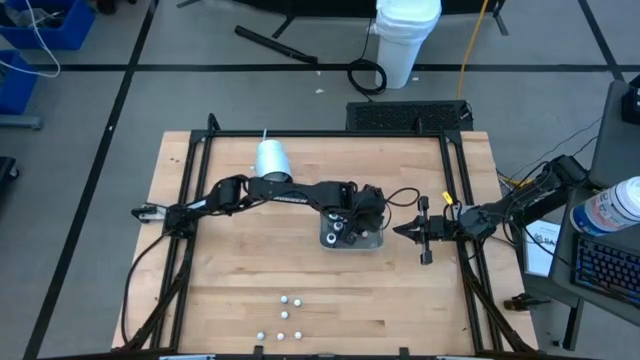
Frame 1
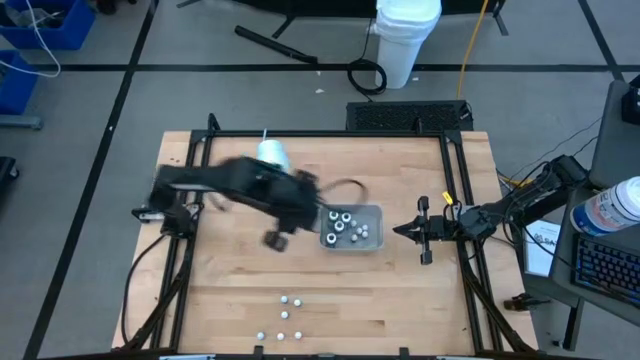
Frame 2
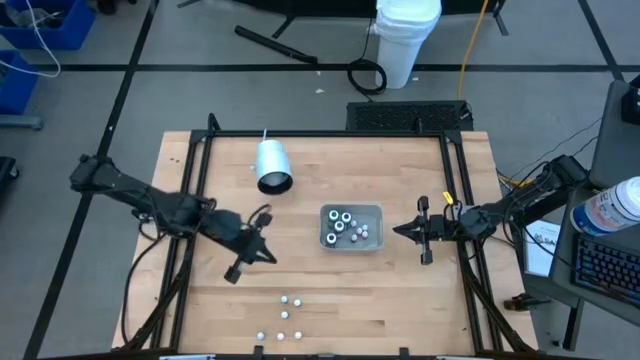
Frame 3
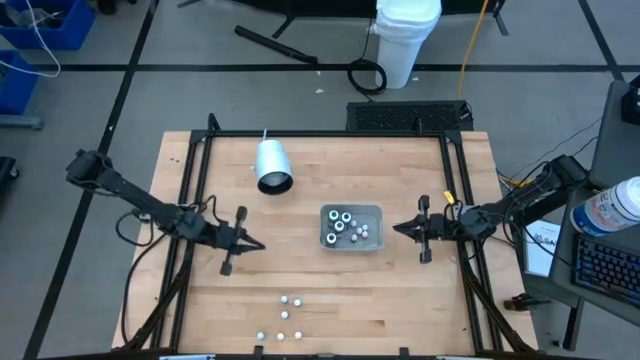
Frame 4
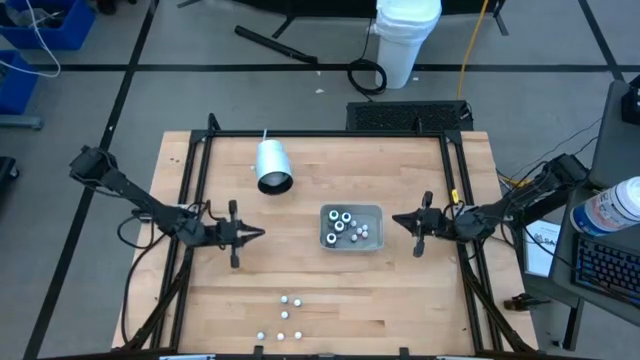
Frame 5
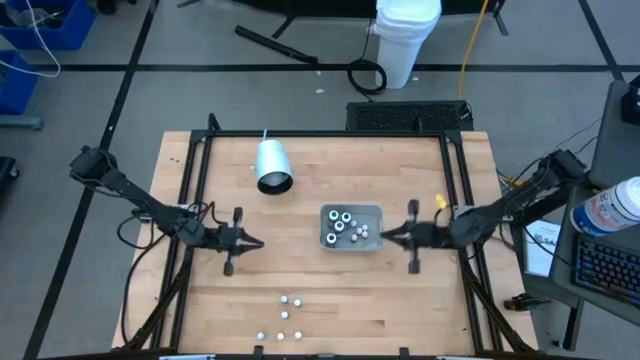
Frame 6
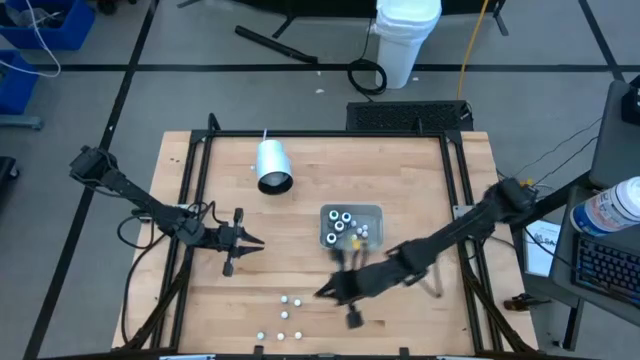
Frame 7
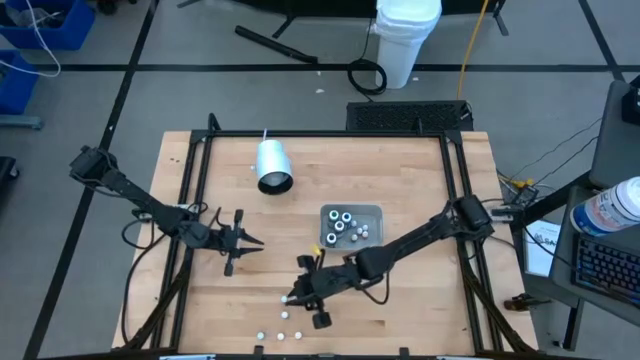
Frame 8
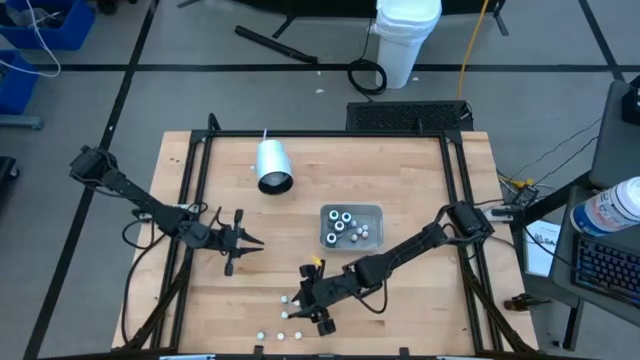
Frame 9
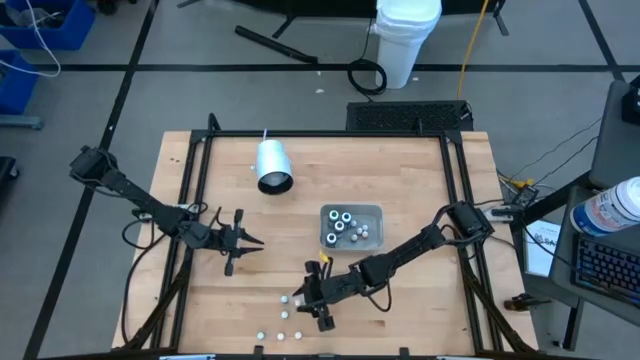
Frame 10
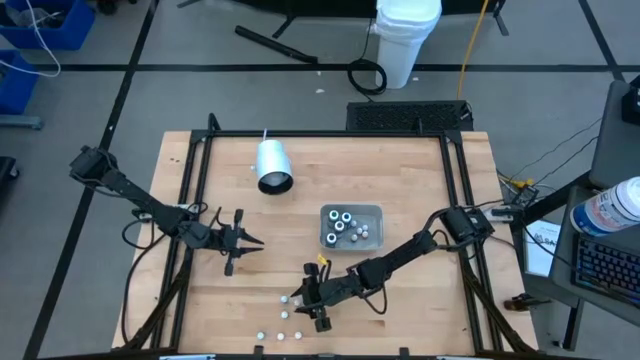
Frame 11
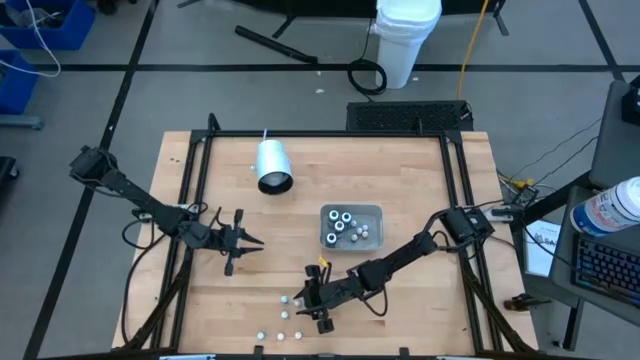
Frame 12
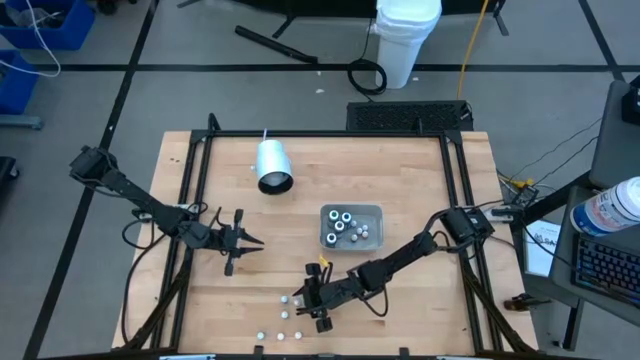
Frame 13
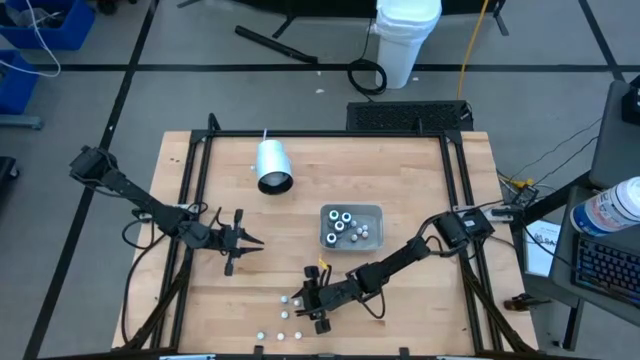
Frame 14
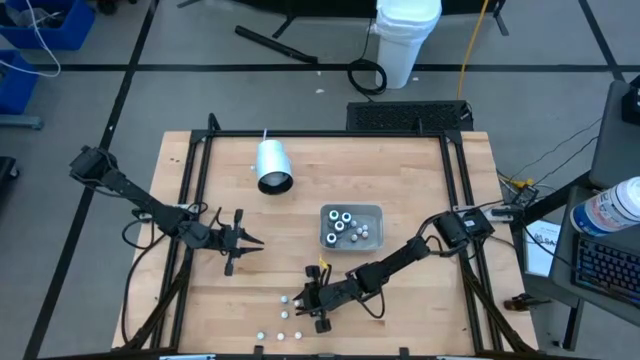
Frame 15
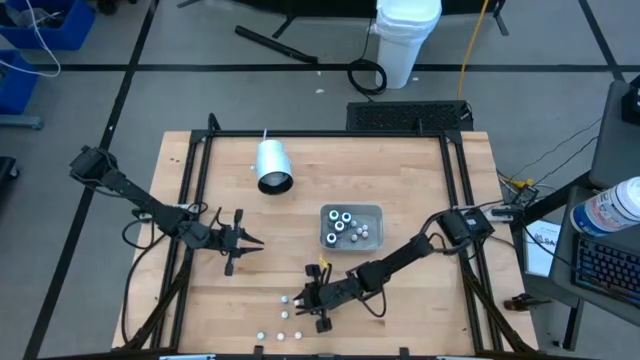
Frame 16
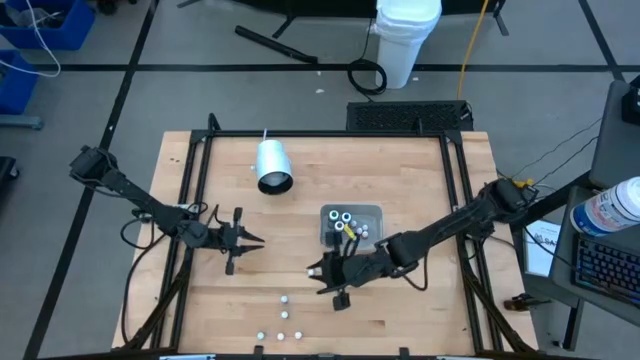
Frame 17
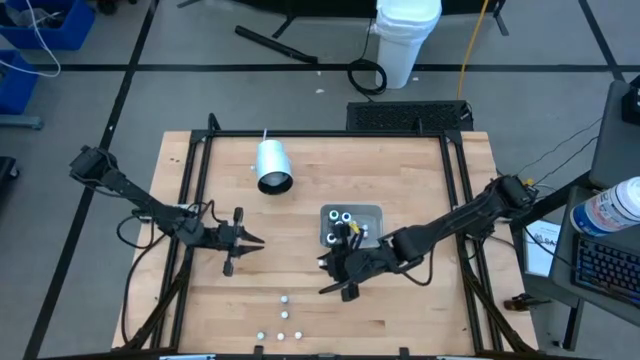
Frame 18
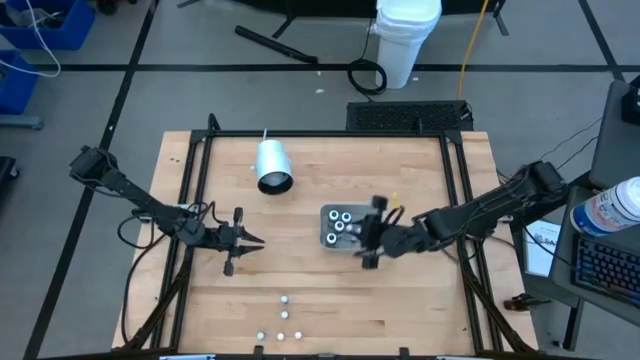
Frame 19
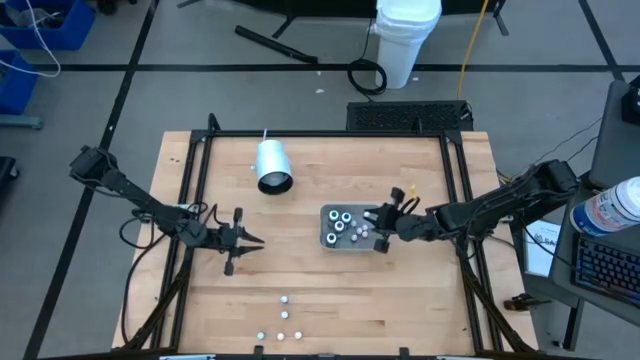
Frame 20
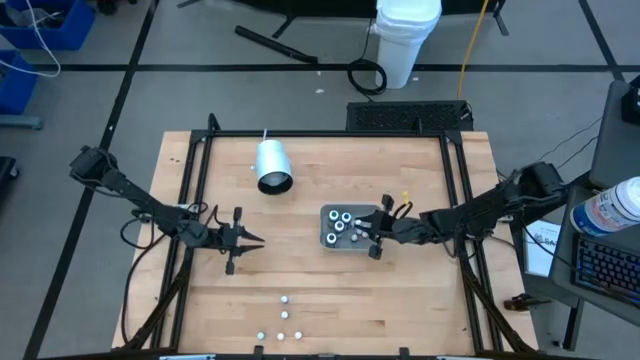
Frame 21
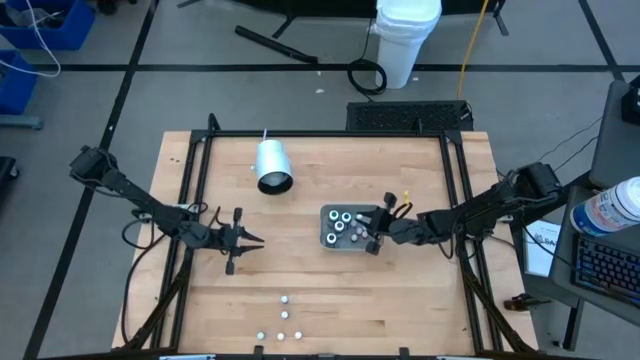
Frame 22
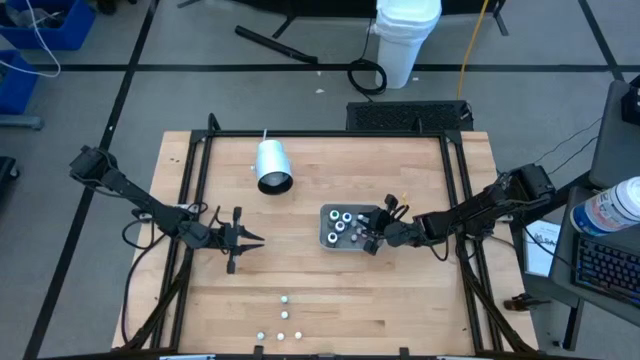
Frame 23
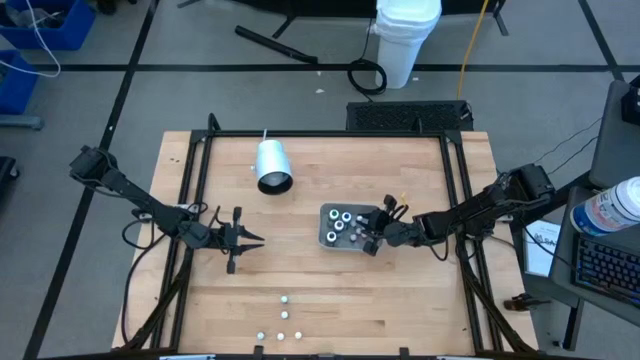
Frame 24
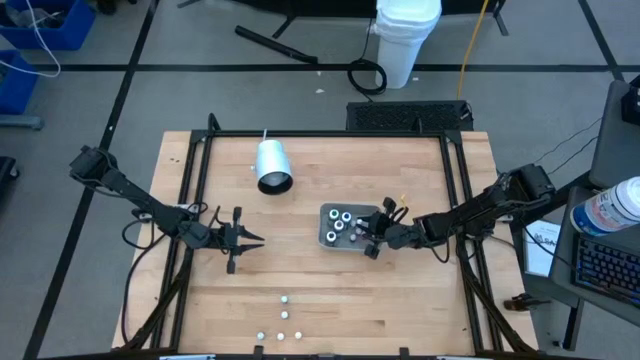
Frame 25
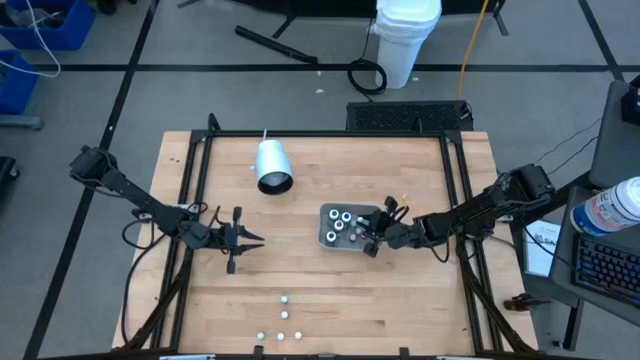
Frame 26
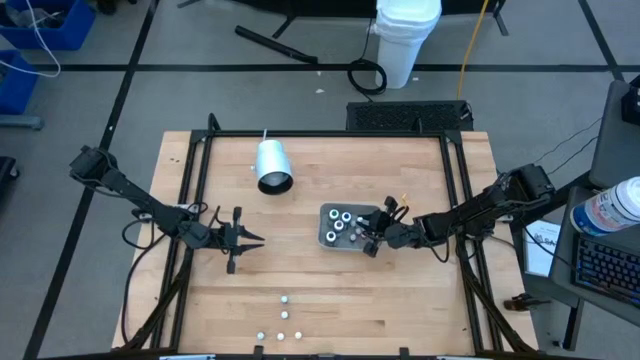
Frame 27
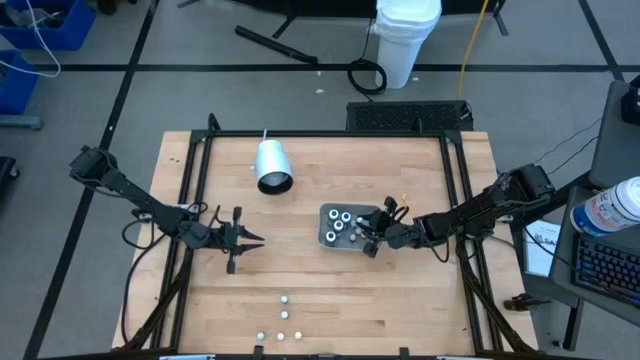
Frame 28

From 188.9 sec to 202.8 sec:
Task: Pick & Place food coloring
Put the small red food coloring bottle into the white bin

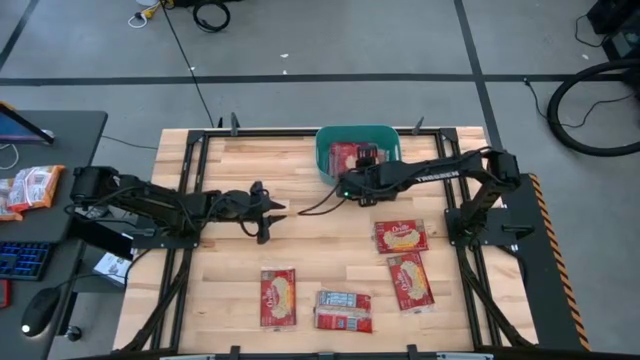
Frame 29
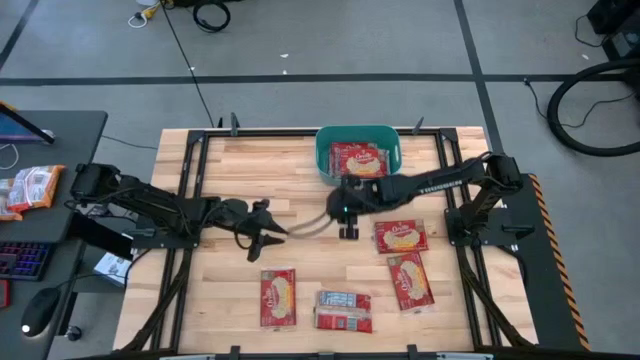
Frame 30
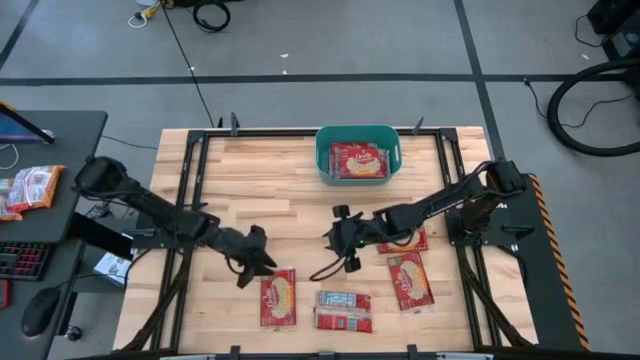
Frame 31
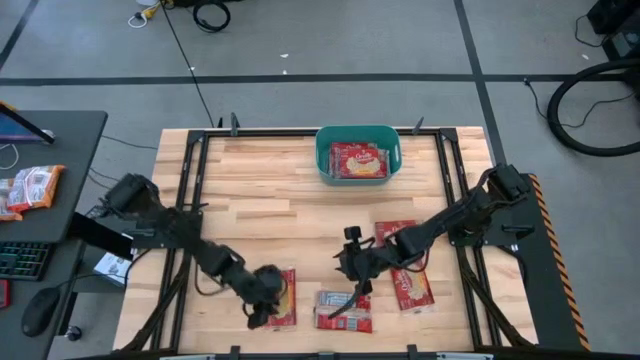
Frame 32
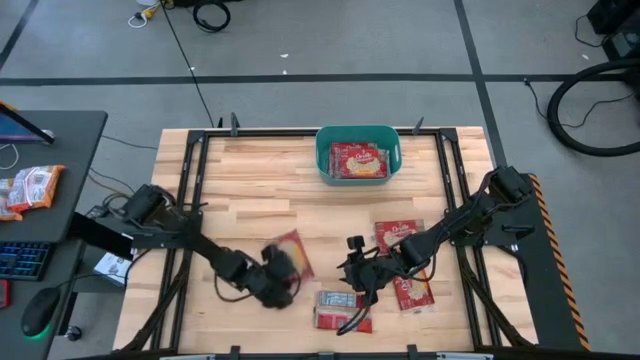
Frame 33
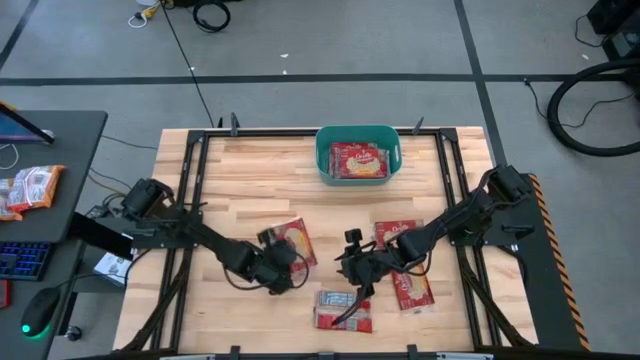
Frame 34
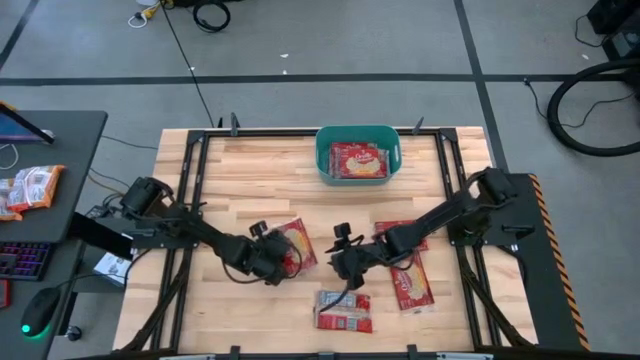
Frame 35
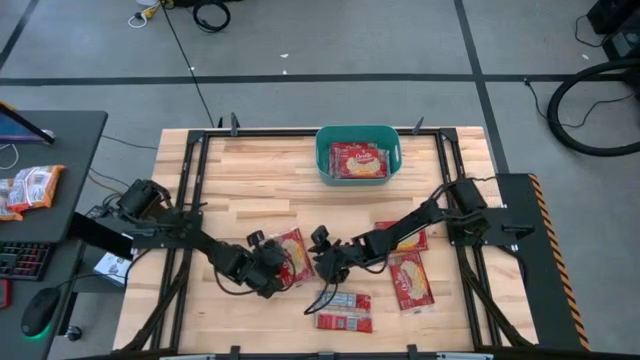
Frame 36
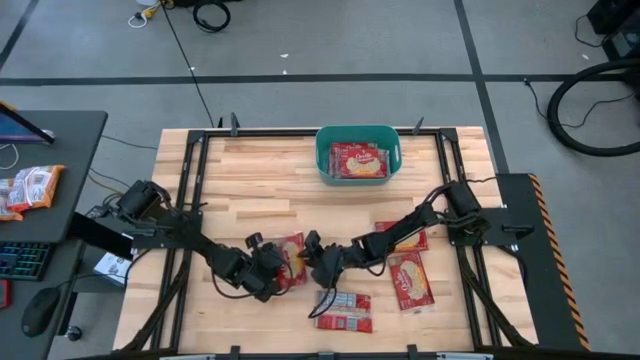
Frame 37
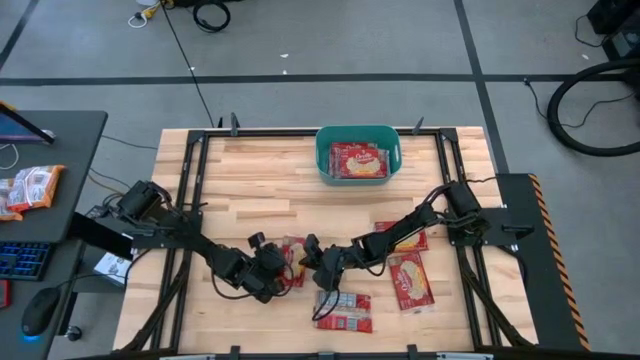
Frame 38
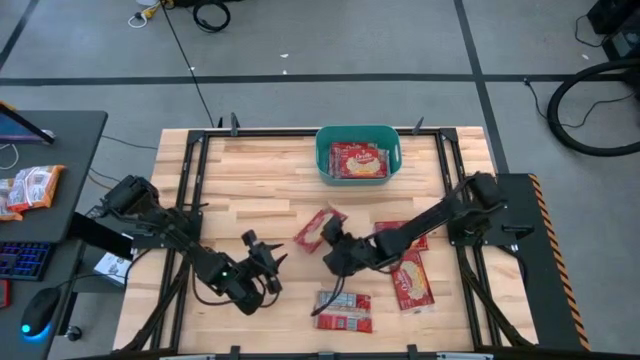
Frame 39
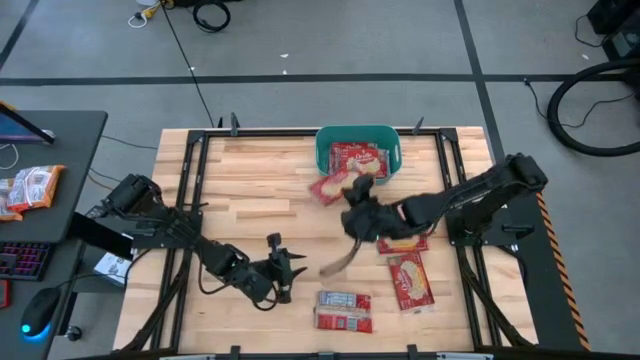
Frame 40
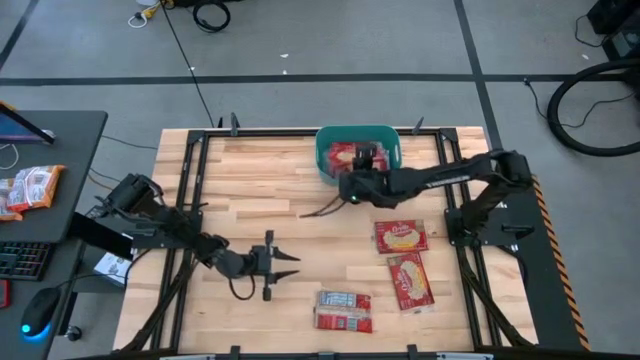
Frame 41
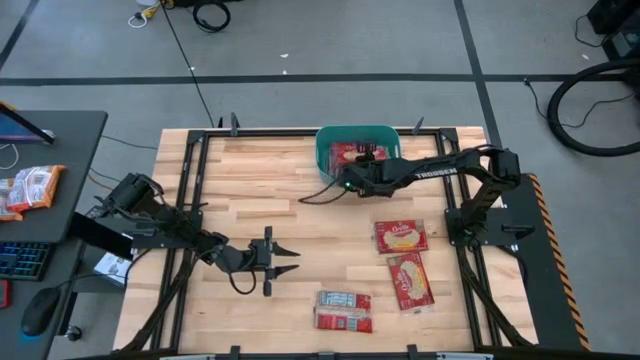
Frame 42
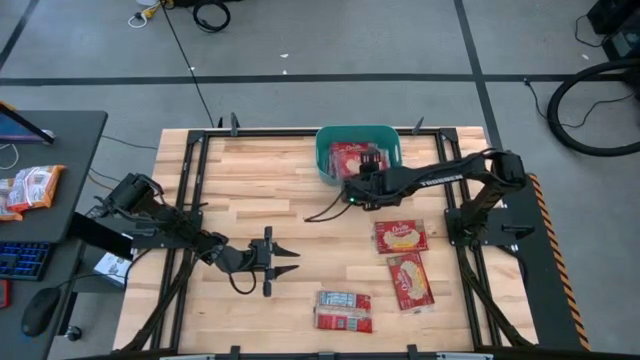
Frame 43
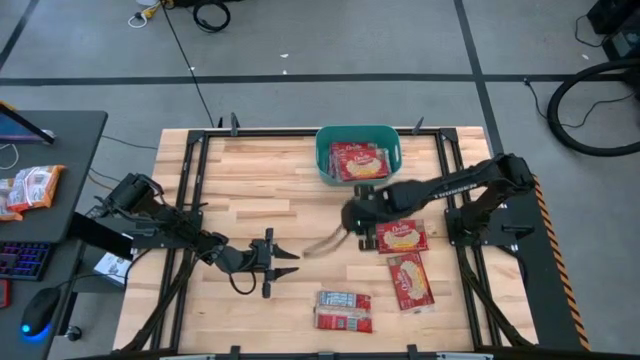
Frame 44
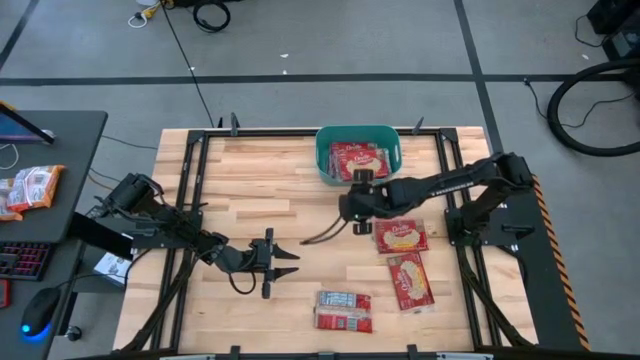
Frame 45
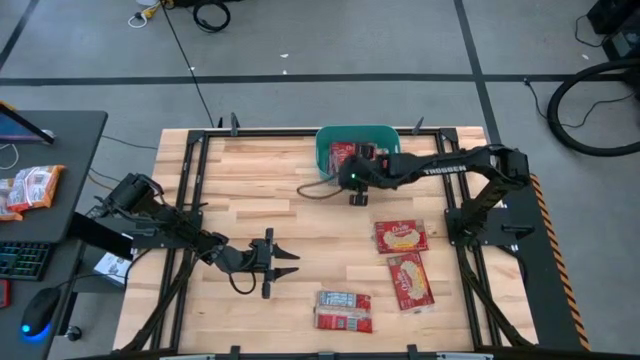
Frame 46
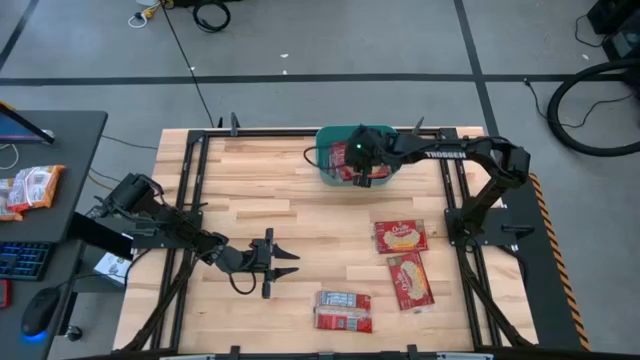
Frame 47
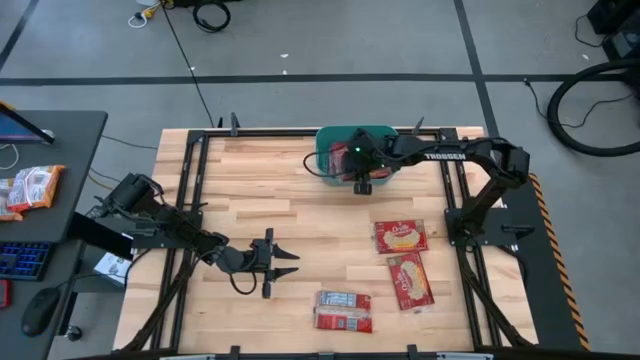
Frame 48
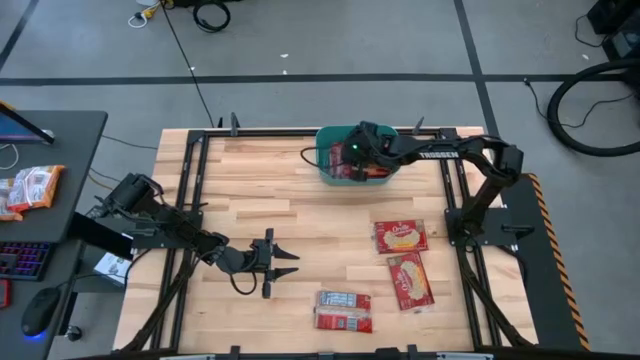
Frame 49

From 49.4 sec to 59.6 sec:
Task: Sort popcorn bags into baskets
Put the red popcorn bag into the blue bin
